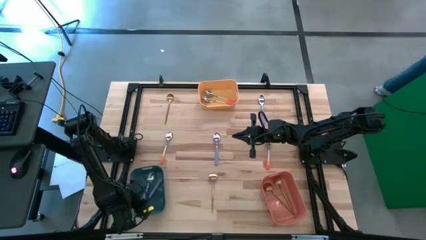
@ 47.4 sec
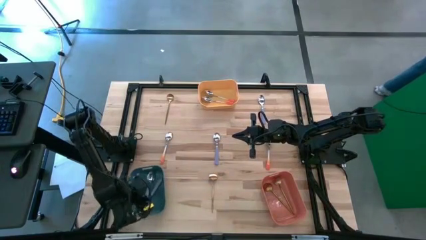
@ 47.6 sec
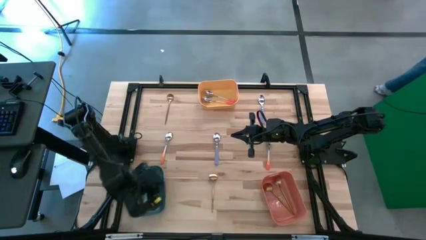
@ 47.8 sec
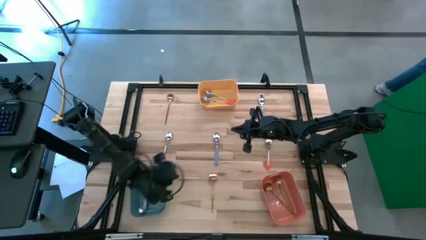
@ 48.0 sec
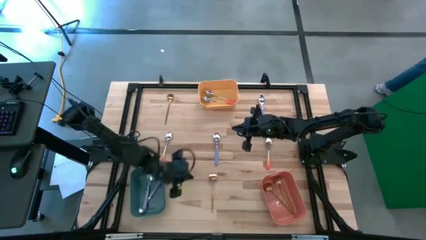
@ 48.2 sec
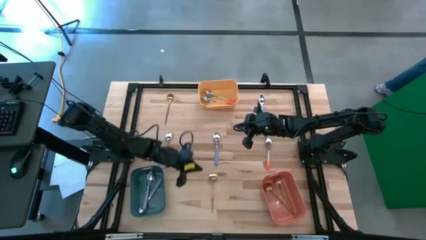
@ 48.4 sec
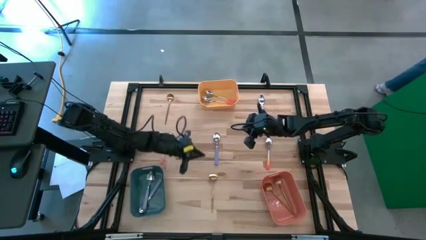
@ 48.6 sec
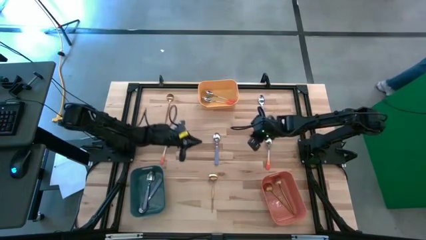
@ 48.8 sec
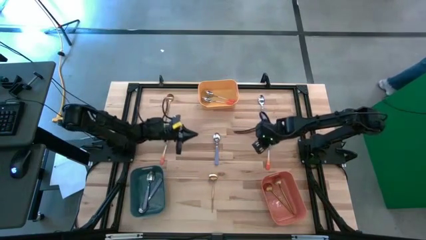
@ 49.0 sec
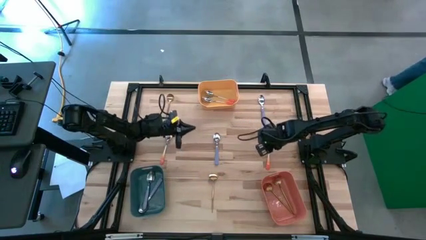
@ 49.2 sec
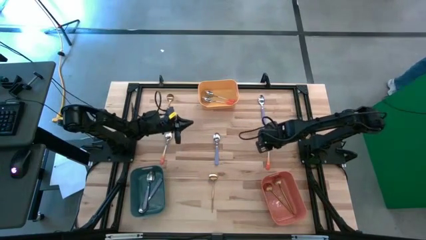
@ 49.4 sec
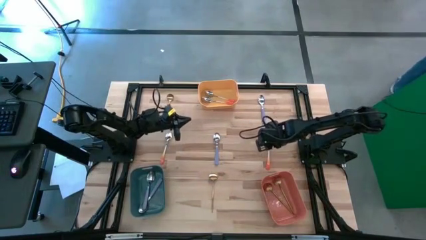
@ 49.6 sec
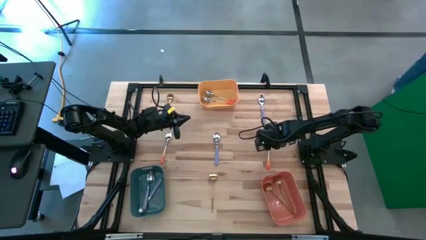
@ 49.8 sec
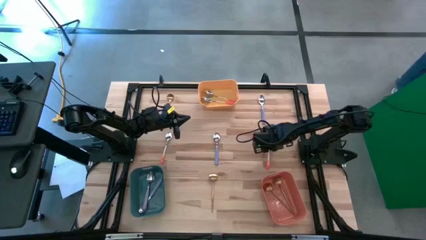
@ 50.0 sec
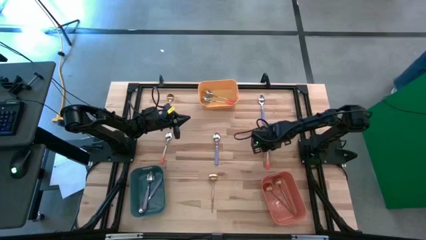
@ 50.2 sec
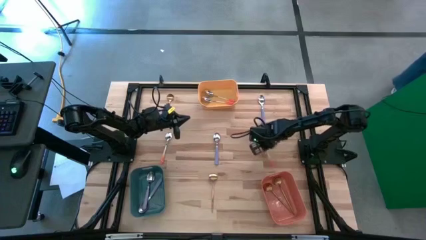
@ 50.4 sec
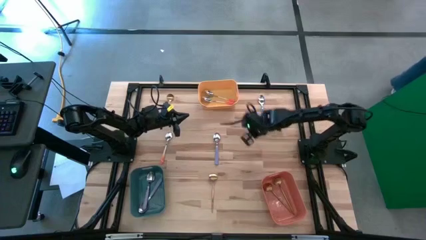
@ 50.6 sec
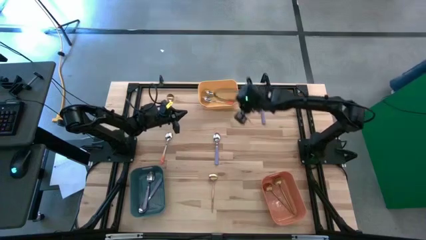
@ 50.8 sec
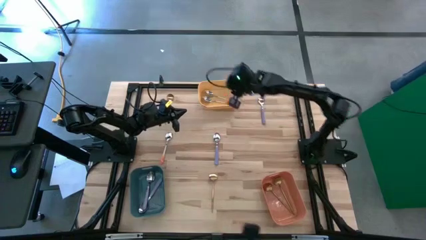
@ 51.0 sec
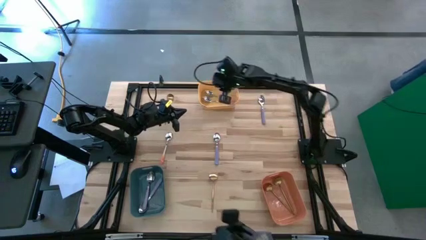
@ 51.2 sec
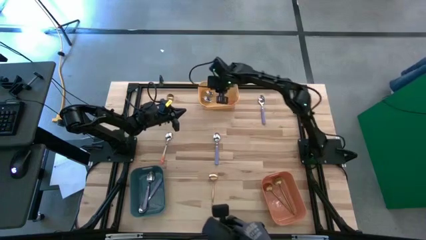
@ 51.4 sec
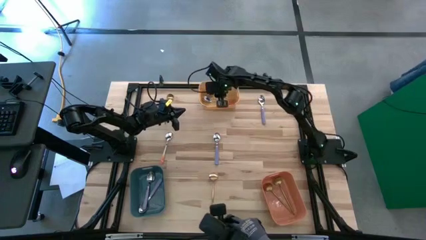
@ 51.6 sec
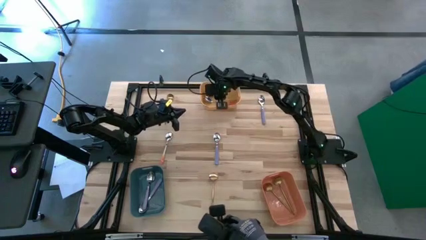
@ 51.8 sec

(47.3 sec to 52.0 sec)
Task: Sort silverware by color (type)
Put the right orange spoon into the yellow bin

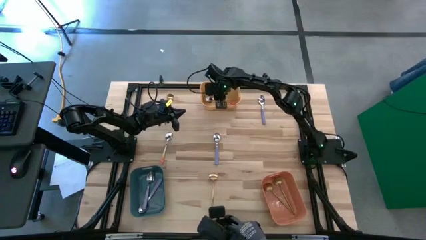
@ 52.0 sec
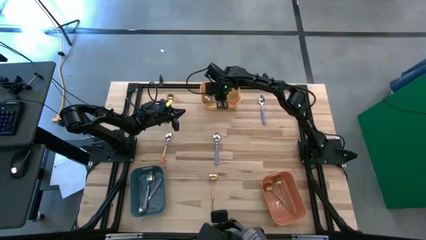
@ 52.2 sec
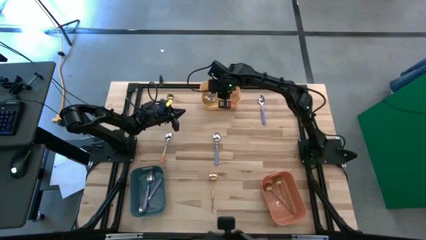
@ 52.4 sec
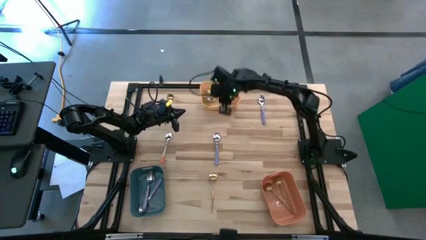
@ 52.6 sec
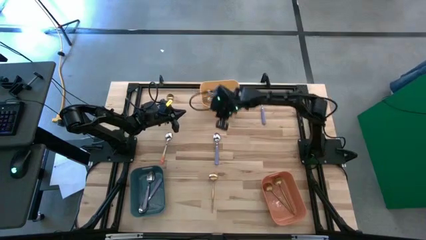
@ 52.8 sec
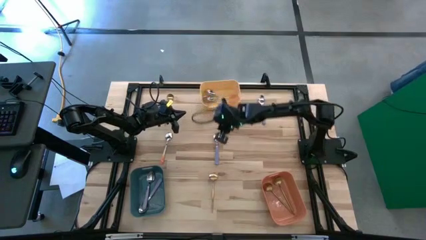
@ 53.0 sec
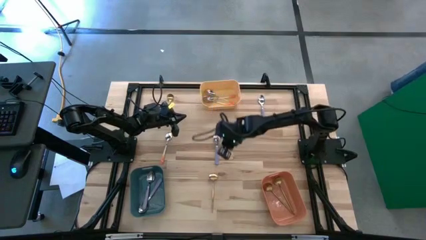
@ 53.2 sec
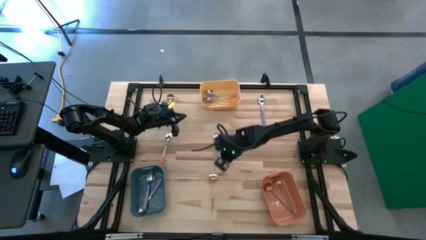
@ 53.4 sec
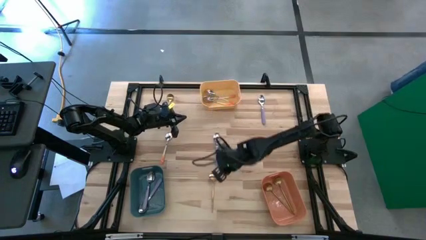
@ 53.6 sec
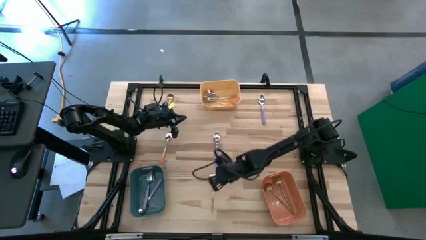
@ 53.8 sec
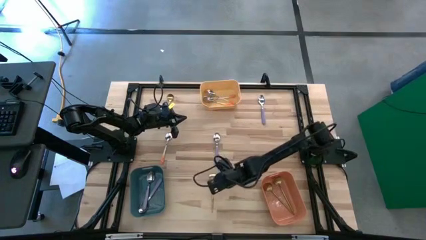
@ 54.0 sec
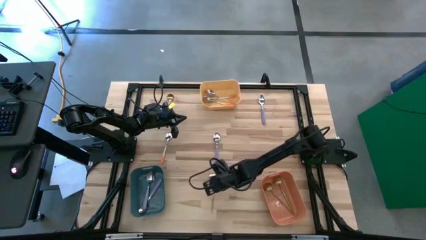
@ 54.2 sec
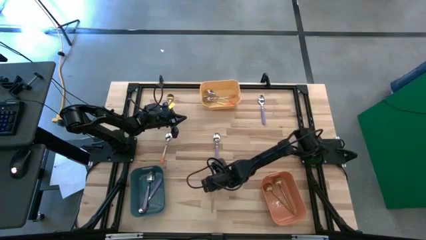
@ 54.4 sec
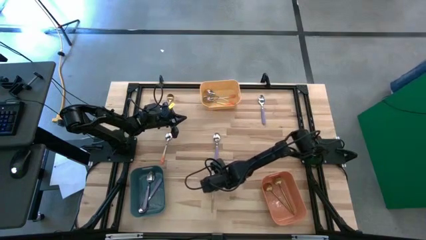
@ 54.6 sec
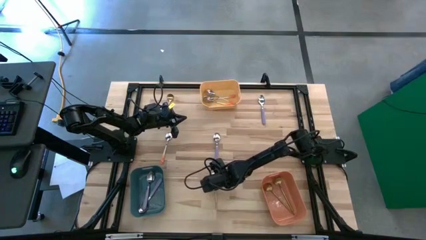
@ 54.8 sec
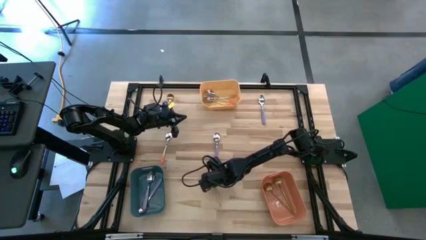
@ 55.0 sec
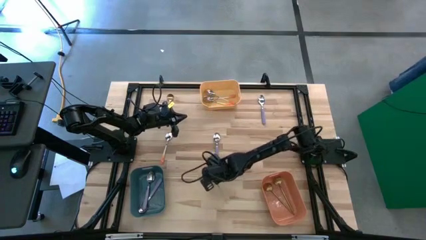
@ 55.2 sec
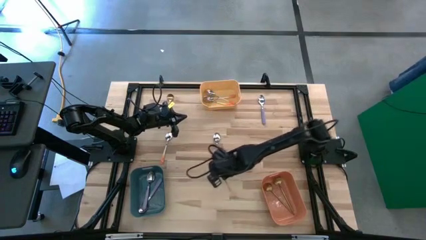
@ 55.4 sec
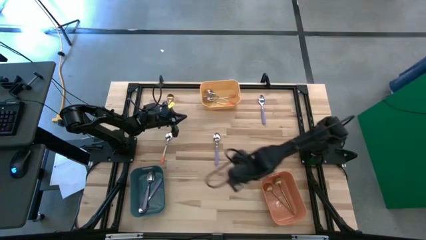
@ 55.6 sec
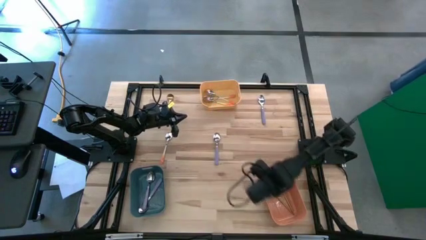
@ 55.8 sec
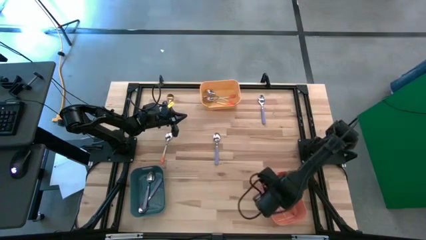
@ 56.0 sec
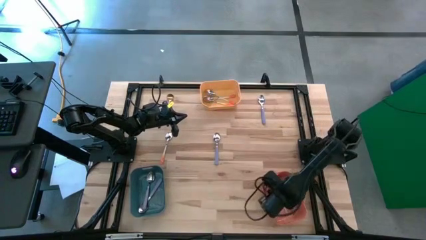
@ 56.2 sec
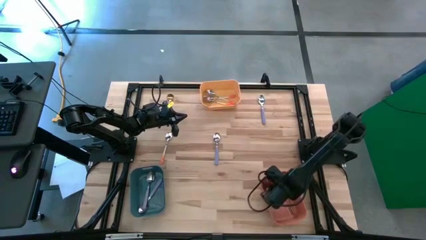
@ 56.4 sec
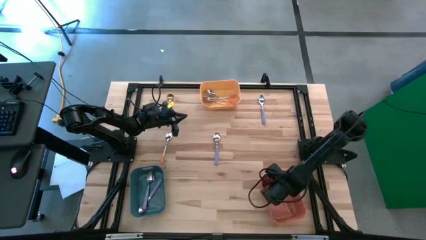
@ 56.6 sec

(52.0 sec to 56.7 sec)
Put the bottom golden spoon into the orange bin

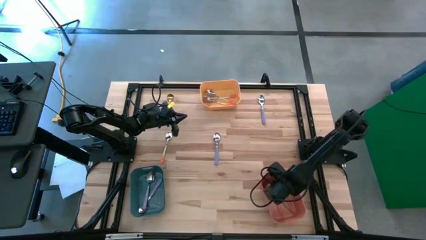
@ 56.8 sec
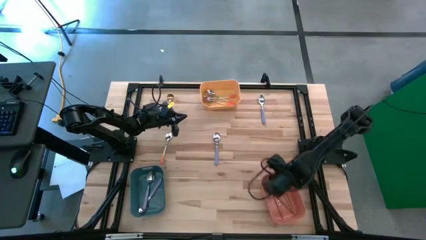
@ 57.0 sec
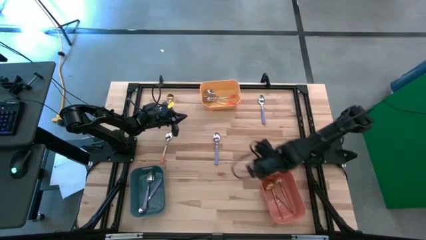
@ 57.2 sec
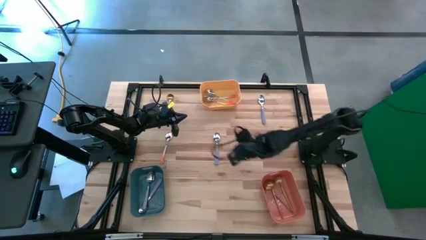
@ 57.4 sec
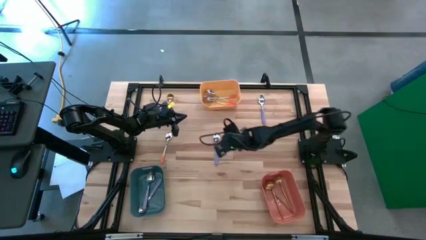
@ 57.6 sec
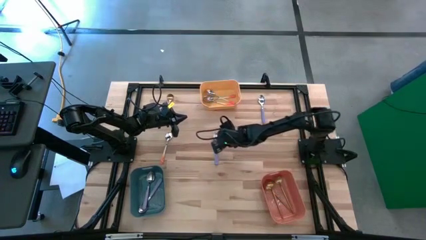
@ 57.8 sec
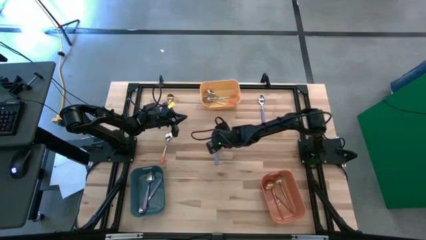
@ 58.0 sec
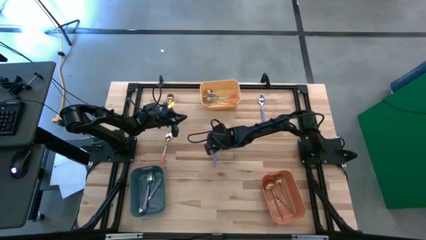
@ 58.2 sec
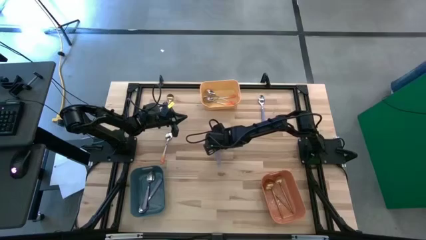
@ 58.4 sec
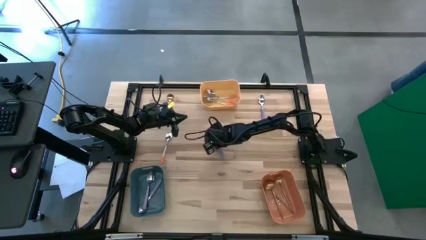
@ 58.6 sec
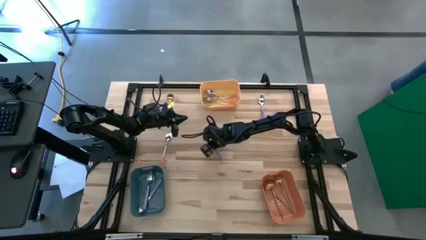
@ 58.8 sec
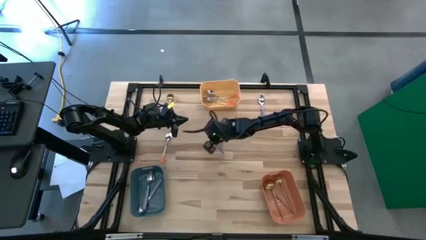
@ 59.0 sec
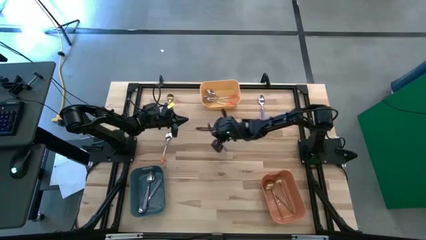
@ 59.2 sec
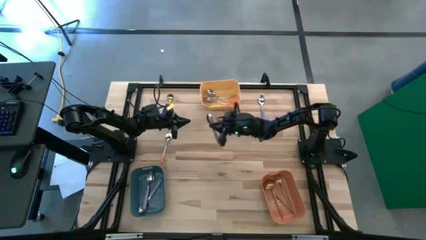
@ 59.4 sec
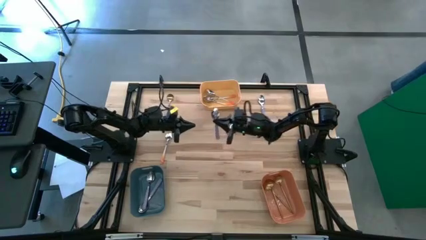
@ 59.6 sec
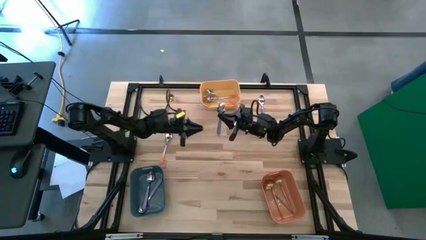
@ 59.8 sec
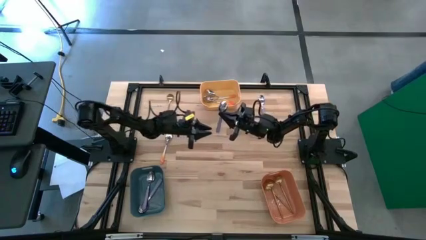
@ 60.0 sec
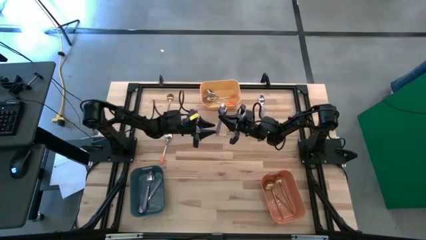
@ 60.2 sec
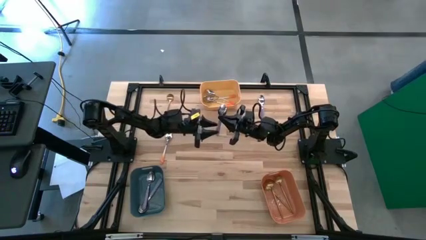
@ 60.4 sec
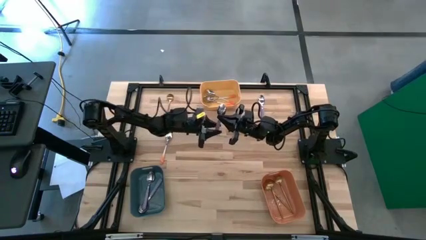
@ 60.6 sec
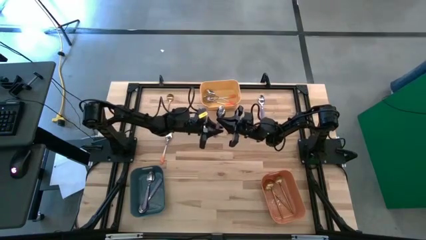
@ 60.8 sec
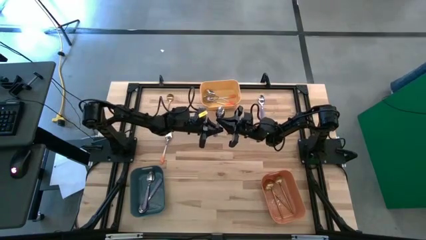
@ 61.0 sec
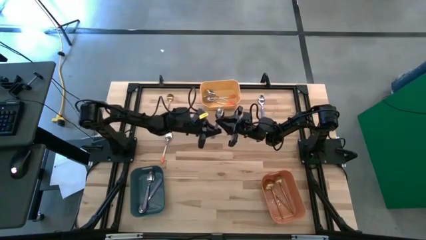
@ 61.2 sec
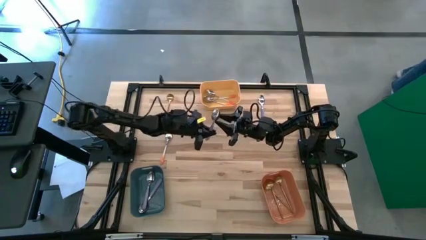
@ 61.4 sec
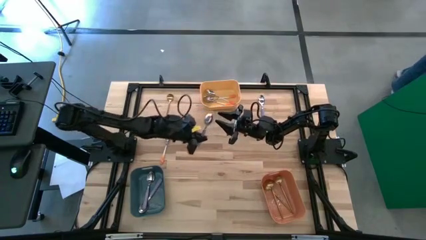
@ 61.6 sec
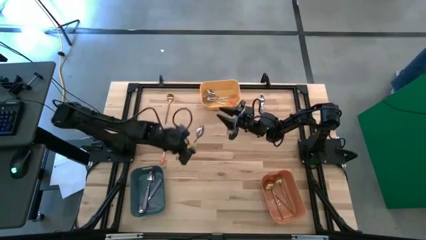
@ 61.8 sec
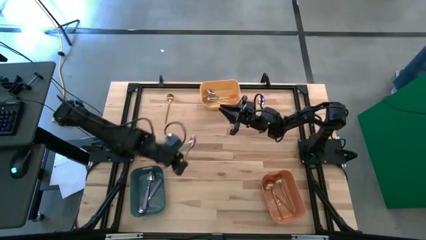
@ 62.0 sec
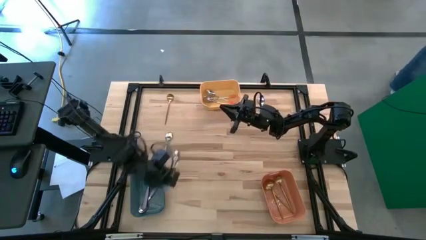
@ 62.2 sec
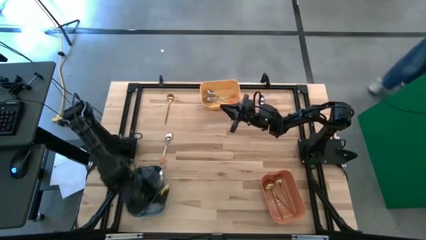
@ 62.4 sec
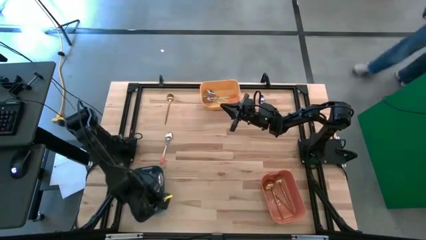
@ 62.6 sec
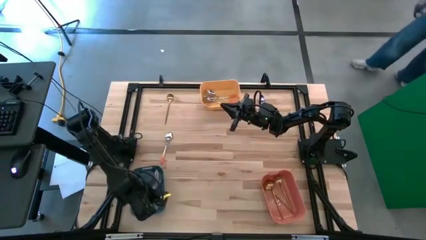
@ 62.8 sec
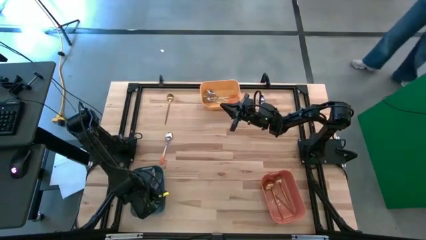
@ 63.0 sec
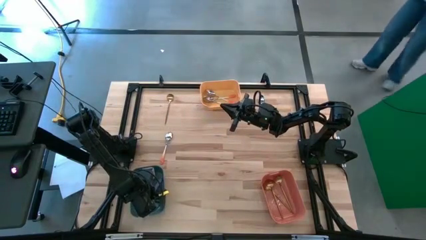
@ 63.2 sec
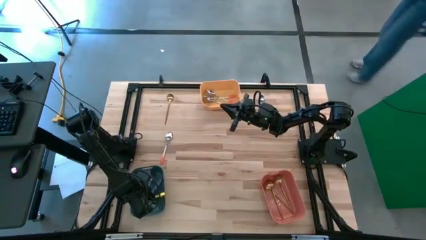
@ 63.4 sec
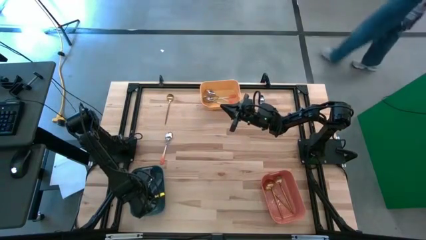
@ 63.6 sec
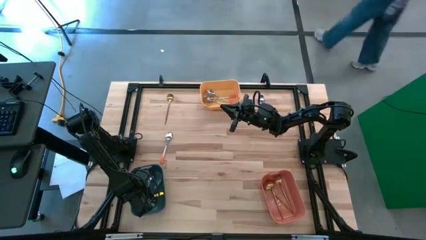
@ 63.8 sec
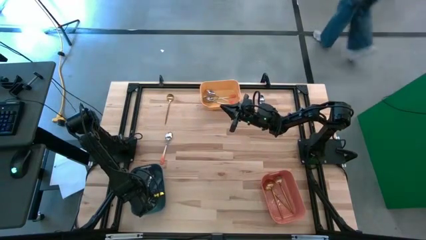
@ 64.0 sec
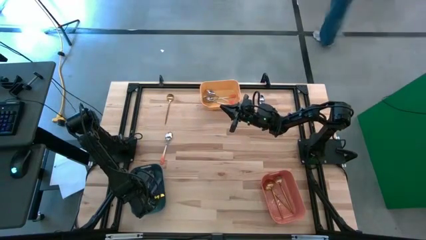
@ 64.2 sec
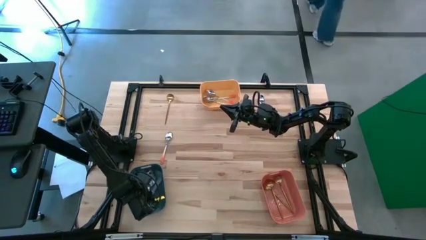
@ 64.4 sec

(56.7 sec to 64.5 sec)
Put the left blue spoon into the blue bin
